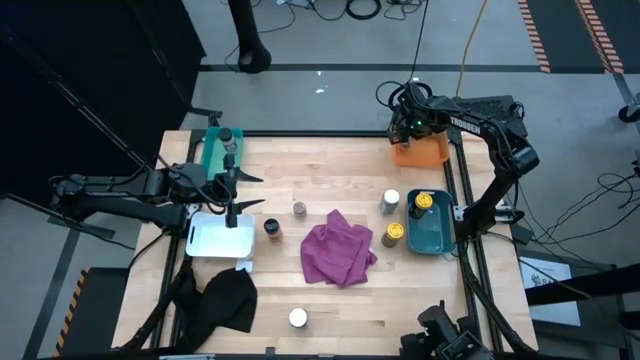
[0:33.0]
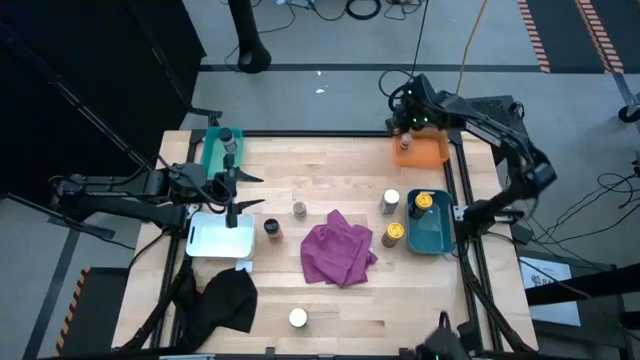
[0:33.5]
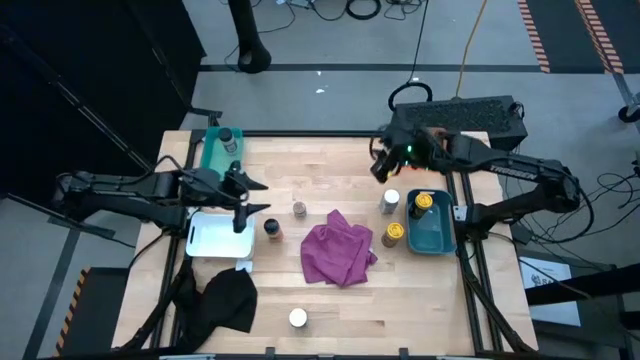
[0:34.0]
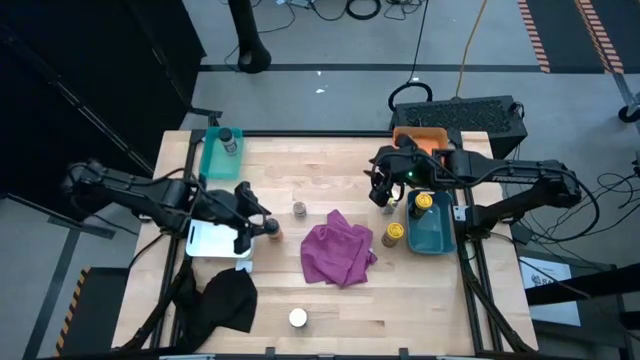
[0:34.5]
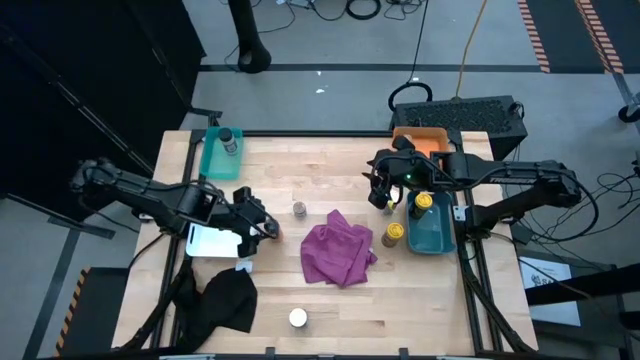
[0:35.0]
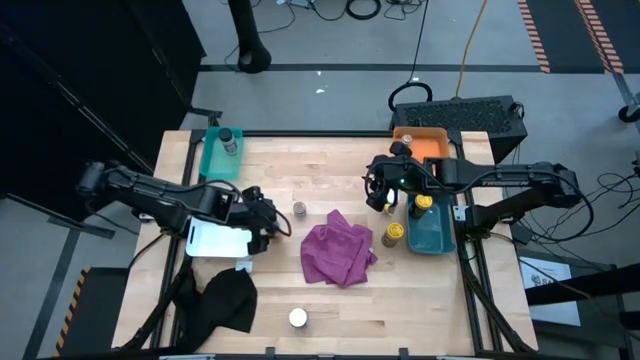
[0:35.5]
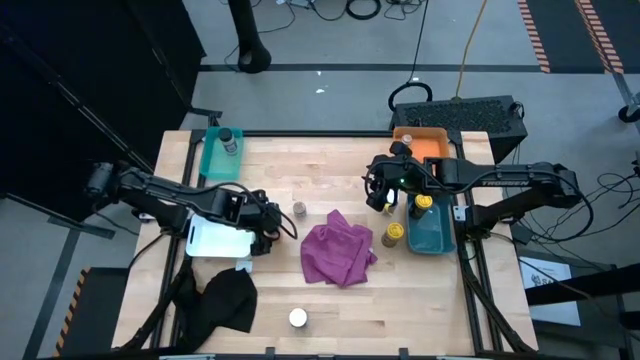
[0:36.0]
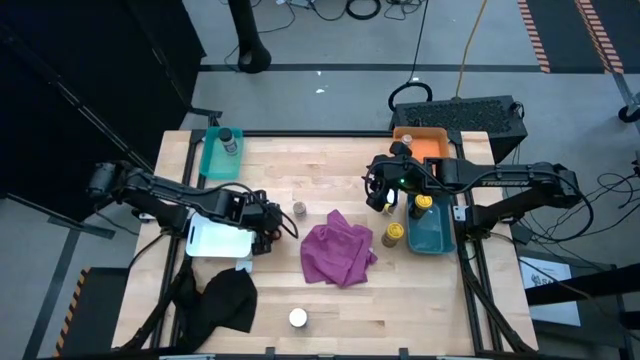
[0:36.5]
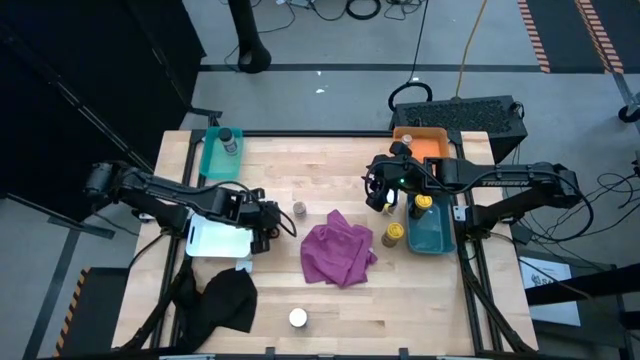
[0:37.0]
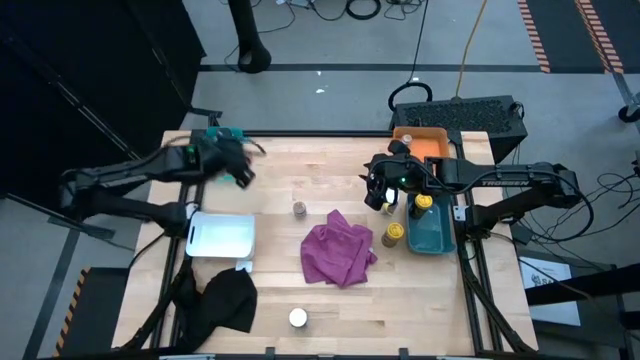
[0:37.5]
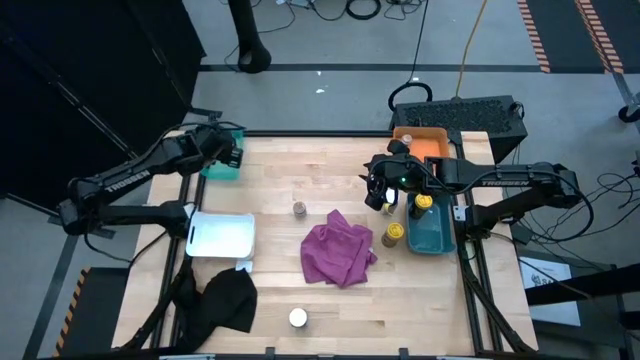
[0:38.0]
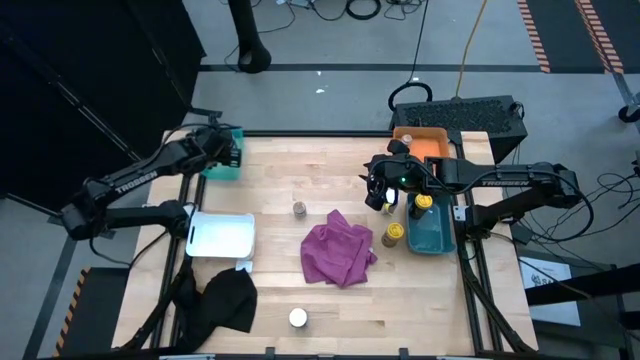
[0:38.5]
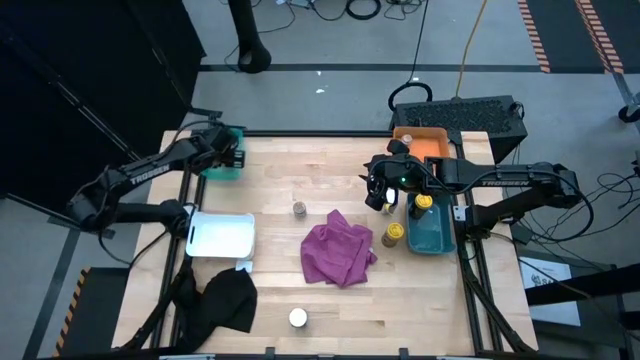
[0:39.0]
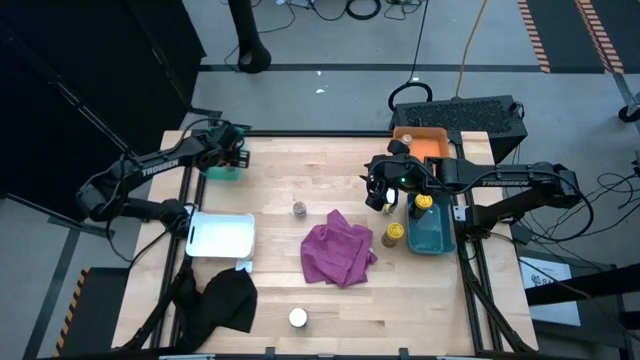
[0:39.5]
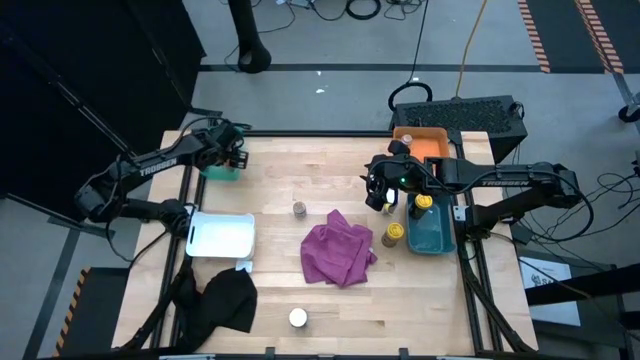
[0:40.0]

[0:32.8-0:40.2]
Task: Sort spices by type
Put the black seasoning bottle into the blue bin

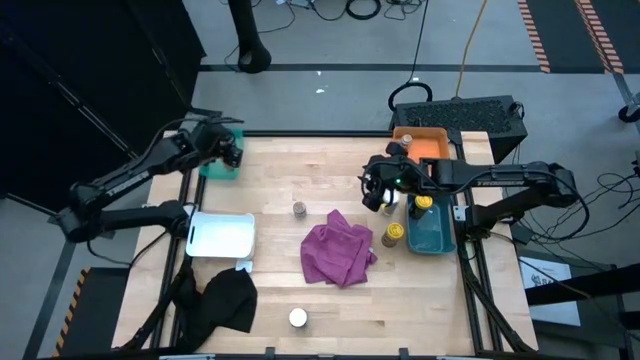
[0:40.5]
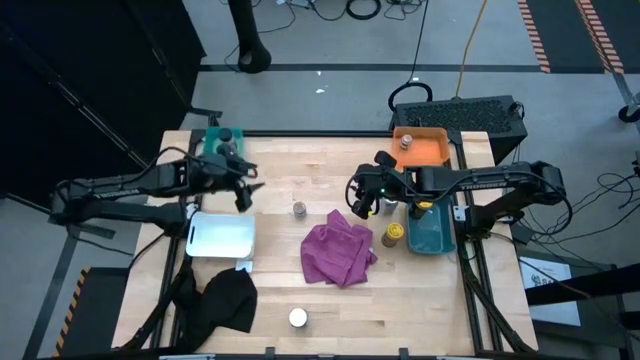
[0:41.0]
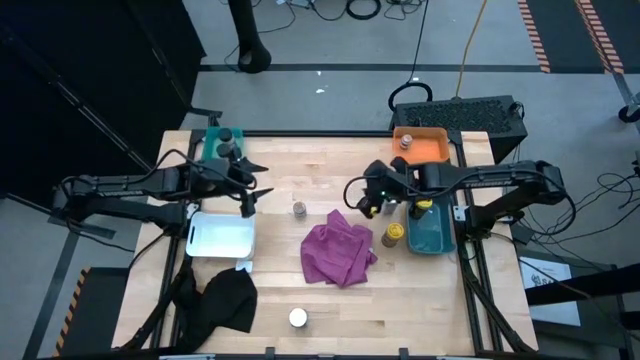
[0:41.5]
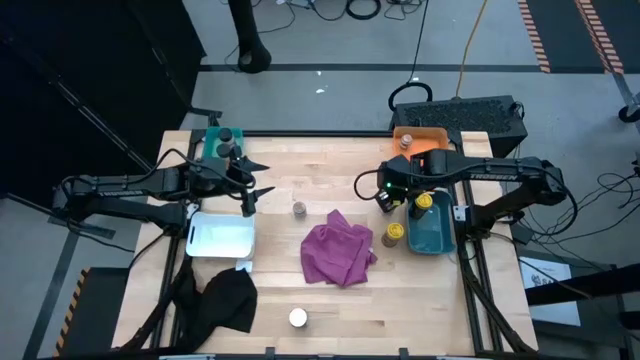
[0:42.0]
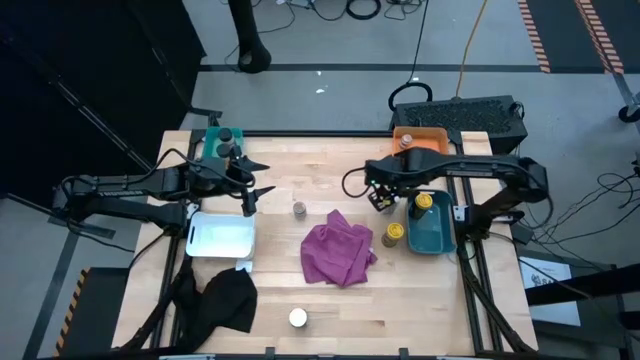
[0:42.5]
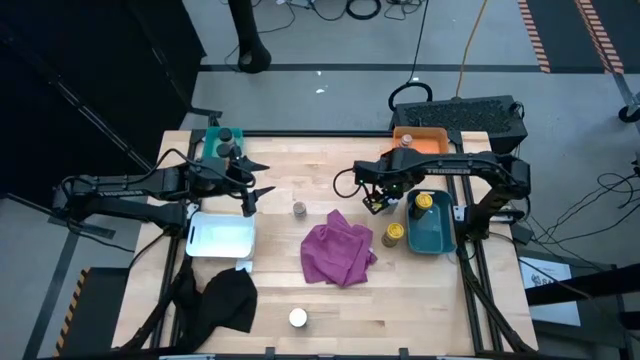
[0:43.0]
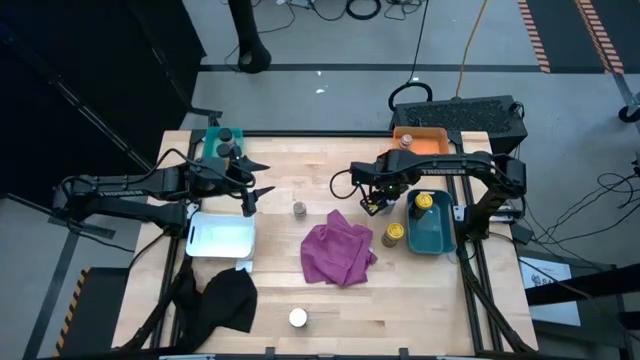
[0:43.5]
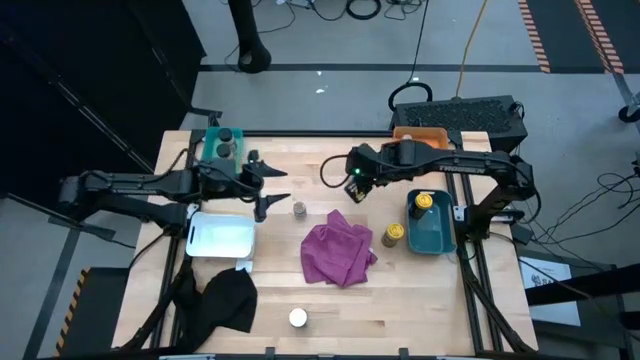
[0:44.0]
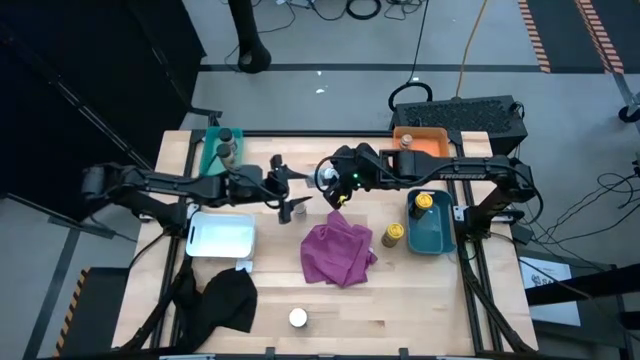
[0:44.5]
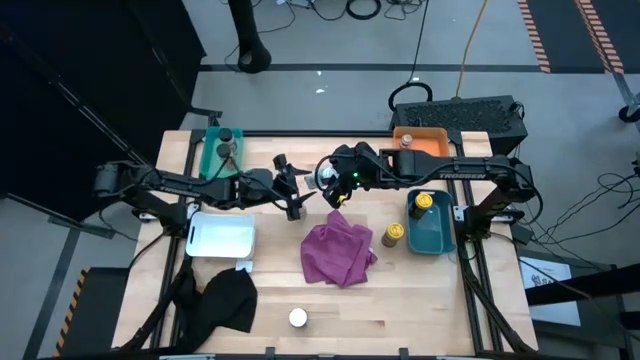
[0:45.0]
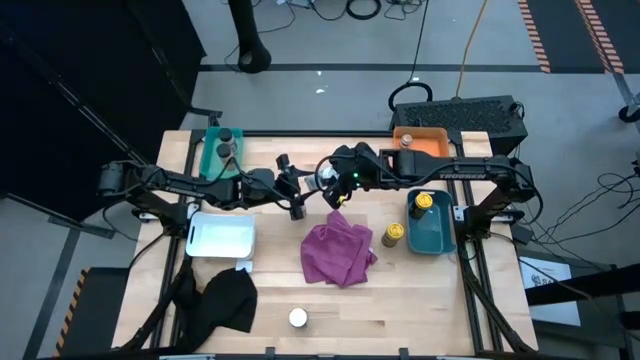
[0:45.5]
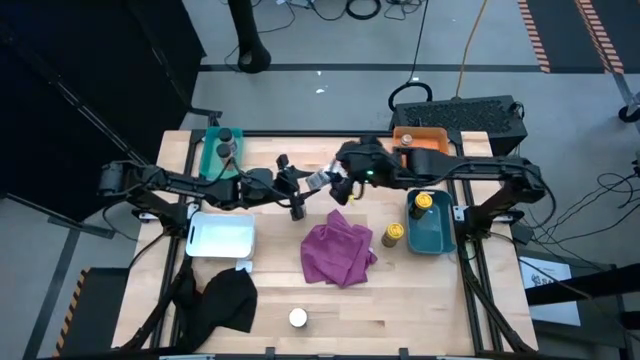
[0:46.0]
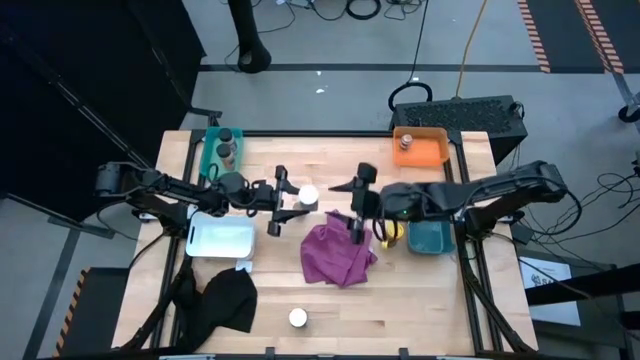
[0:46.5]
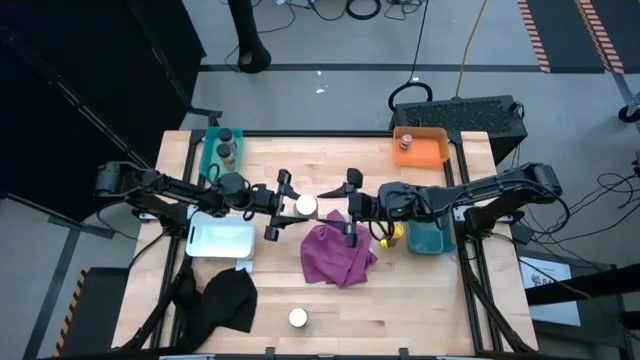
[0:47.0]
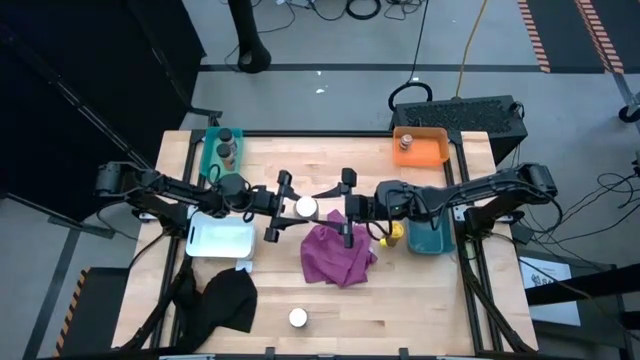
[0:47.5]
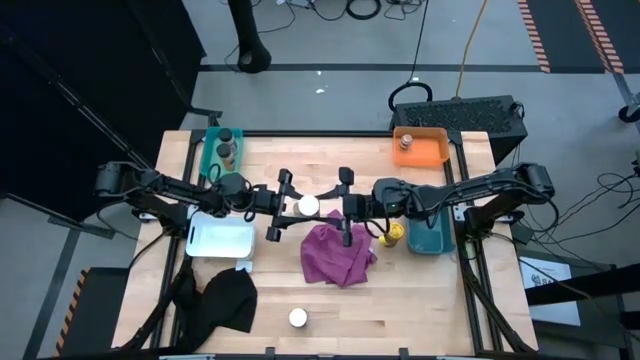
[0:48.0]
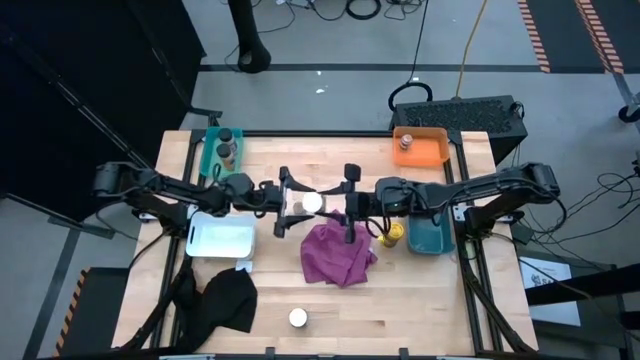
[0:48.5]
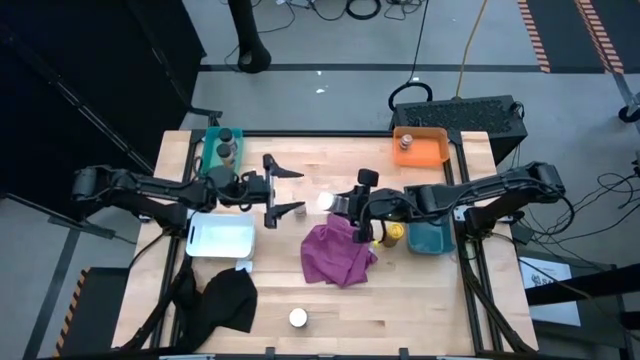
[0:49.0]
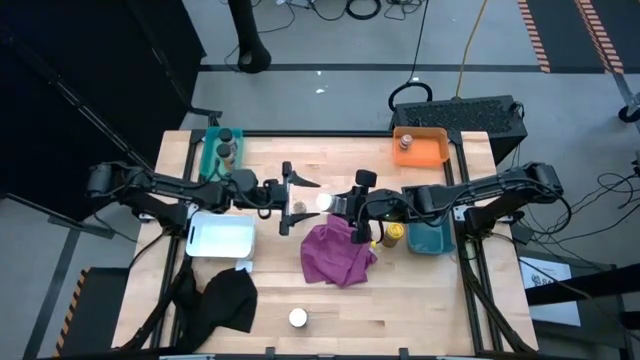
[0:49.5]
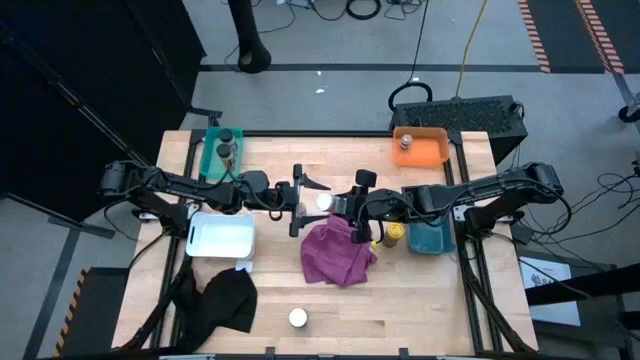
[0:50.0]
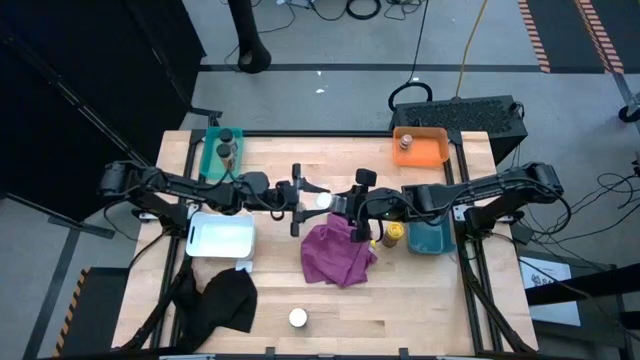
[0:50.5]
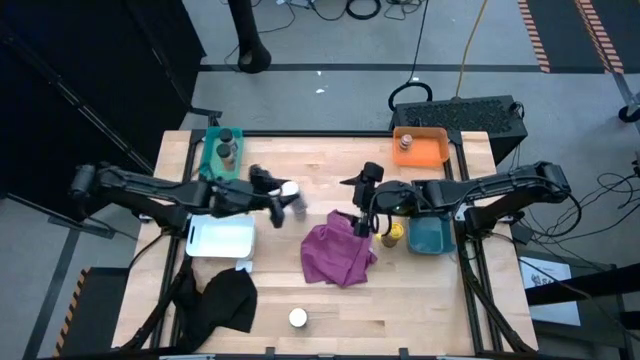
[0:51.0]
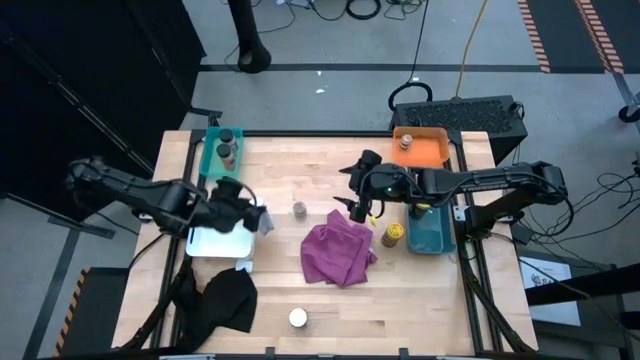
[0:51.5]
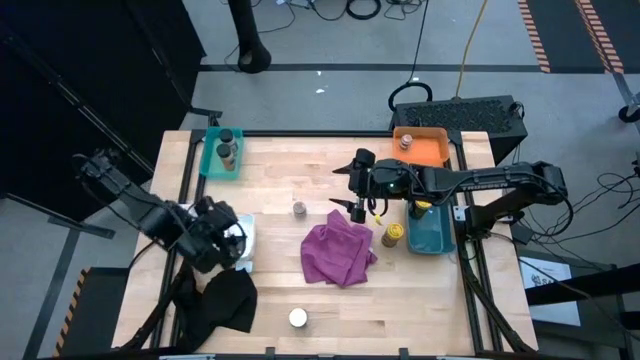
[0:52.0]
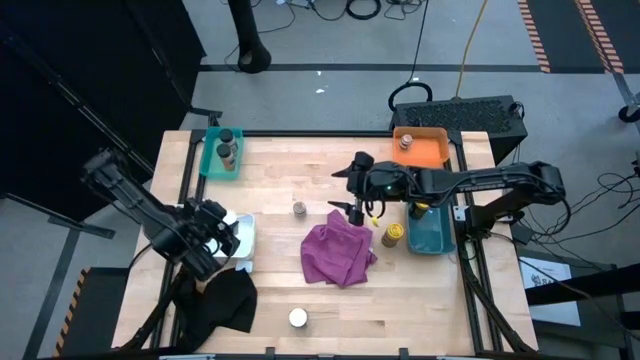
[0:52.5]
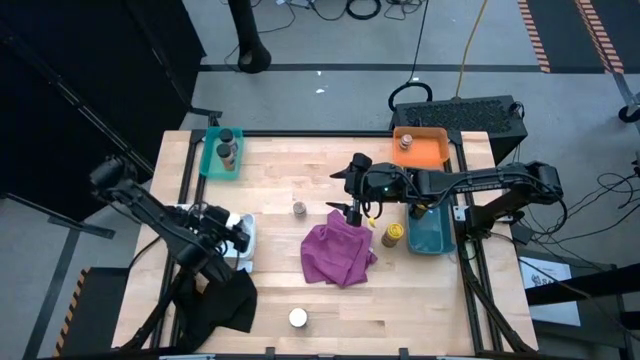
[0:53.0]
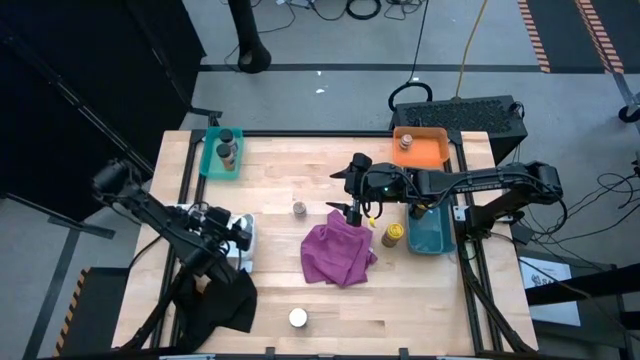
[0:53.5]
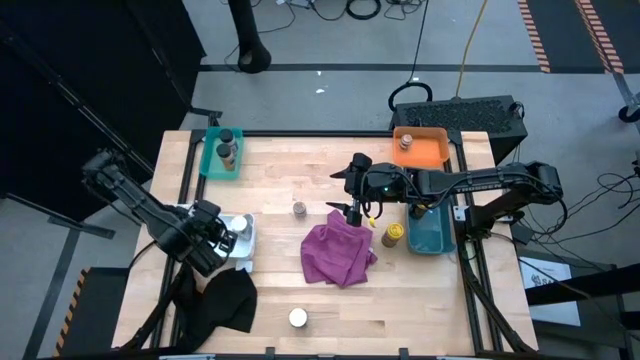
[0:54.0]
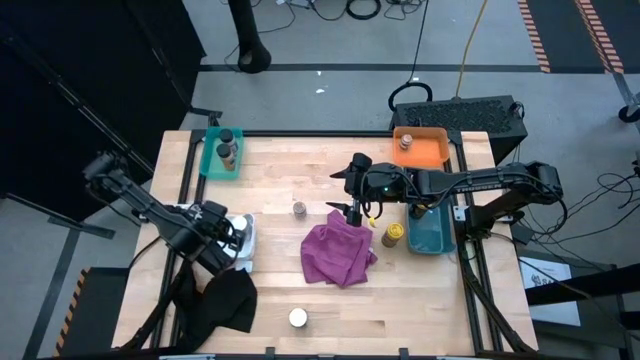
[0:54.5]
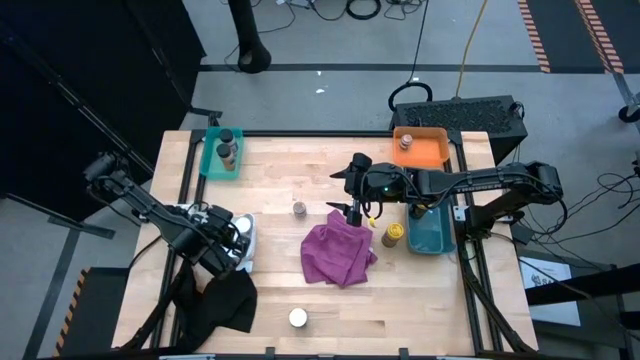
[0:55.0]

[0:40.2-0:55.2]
Put the top white seasoning bottle into the white bin
